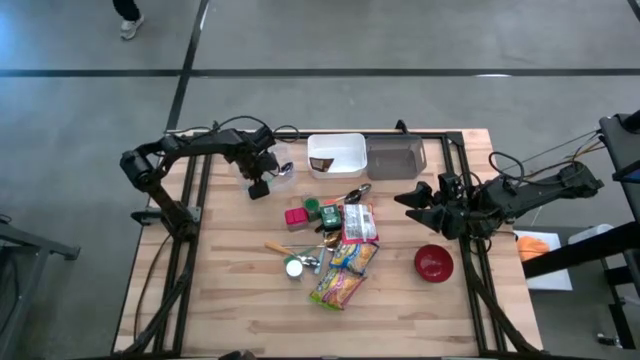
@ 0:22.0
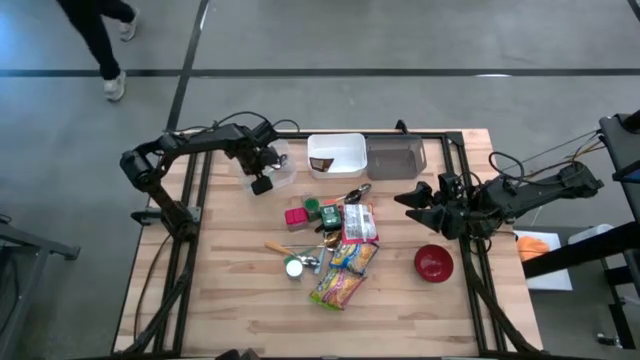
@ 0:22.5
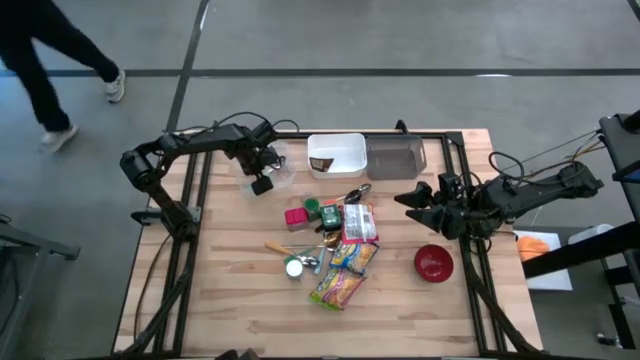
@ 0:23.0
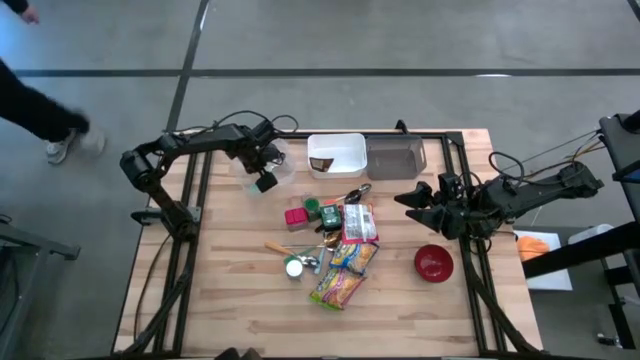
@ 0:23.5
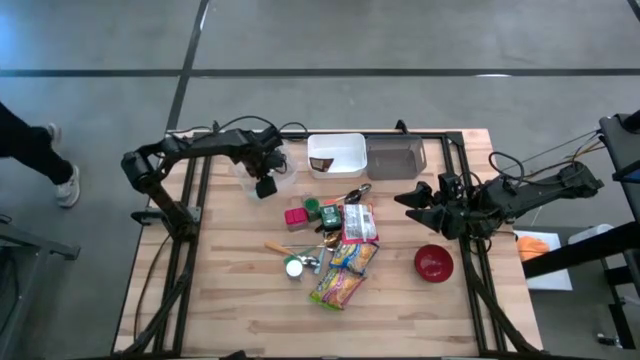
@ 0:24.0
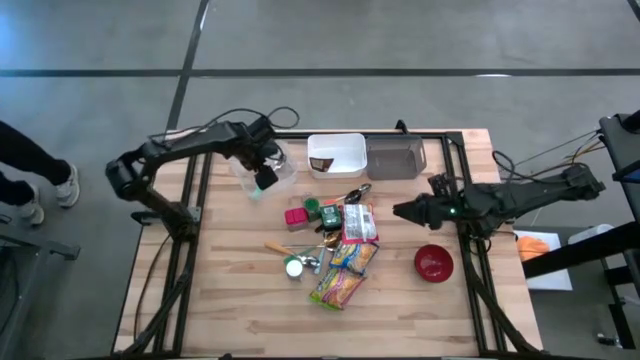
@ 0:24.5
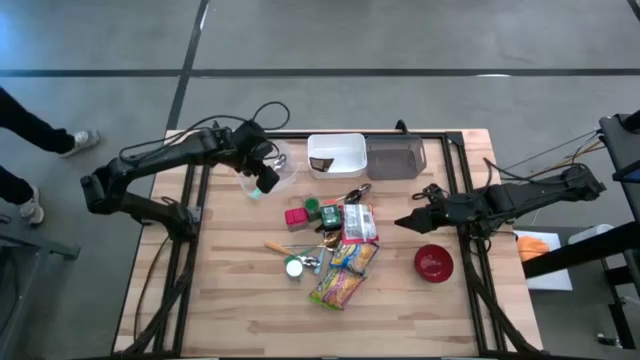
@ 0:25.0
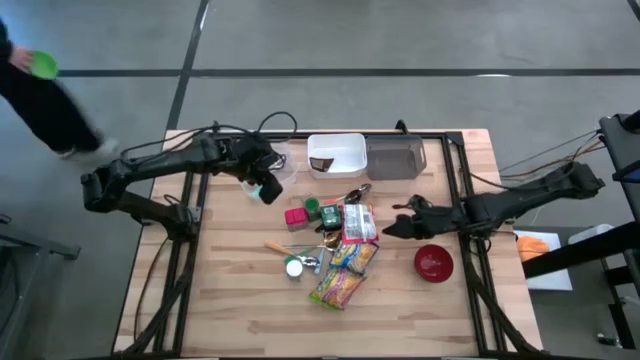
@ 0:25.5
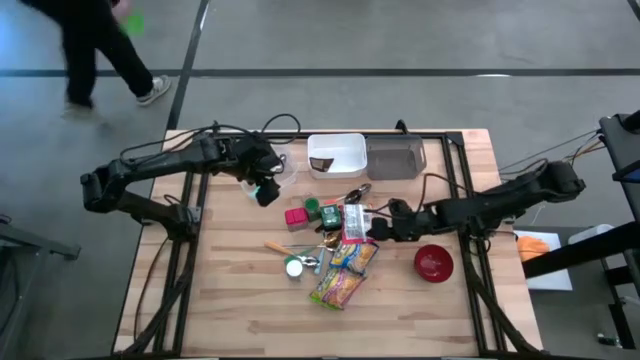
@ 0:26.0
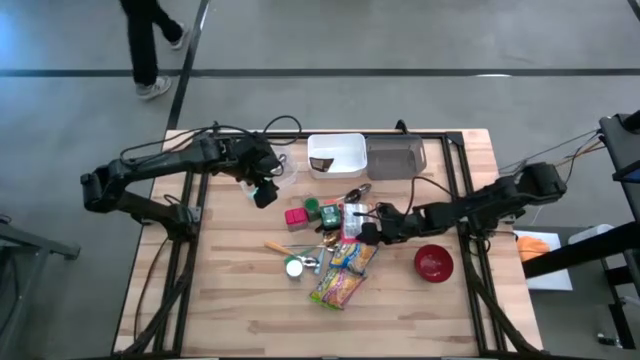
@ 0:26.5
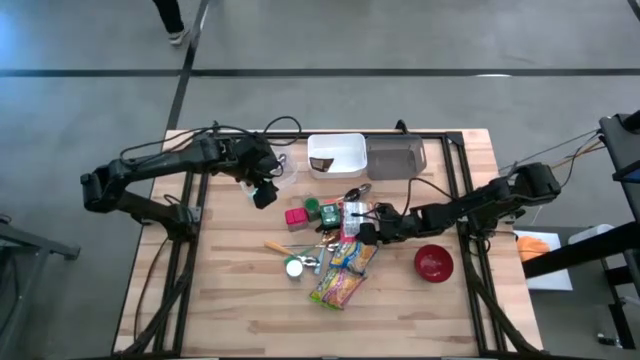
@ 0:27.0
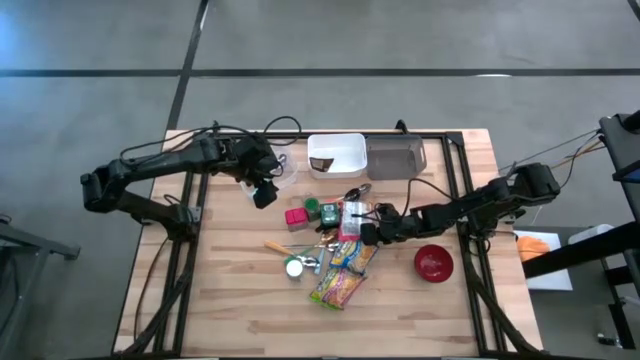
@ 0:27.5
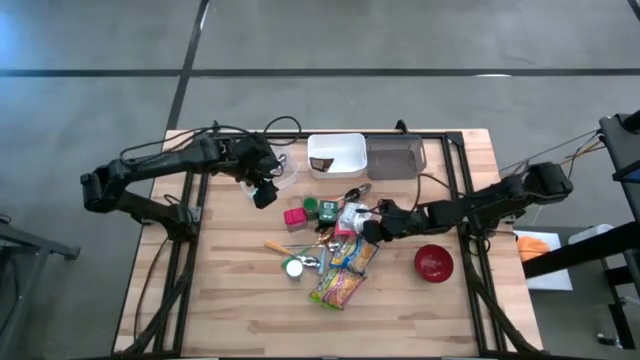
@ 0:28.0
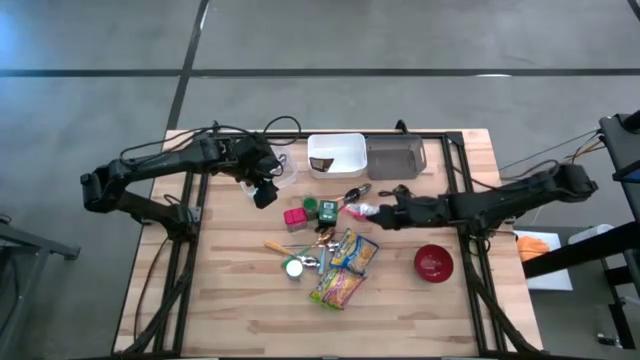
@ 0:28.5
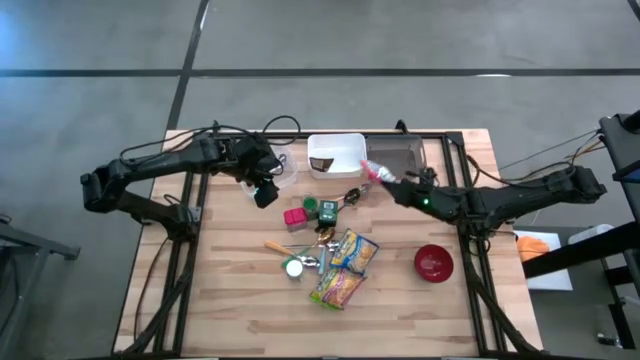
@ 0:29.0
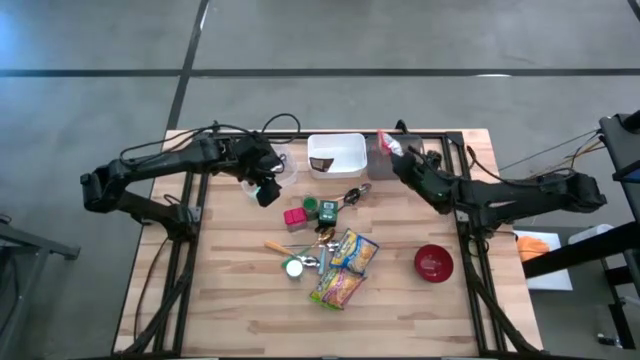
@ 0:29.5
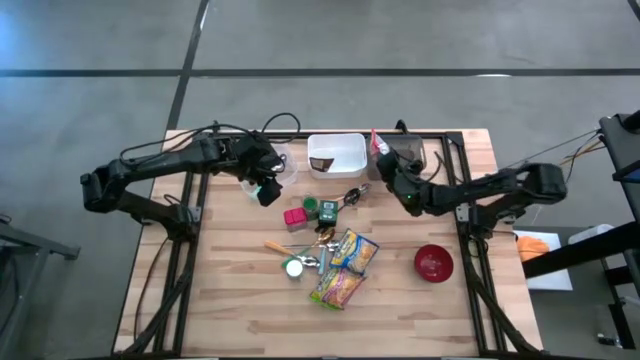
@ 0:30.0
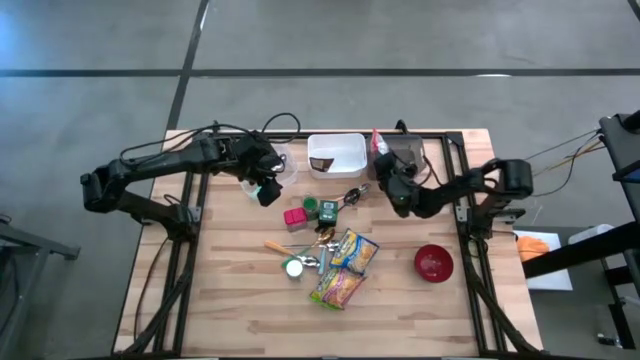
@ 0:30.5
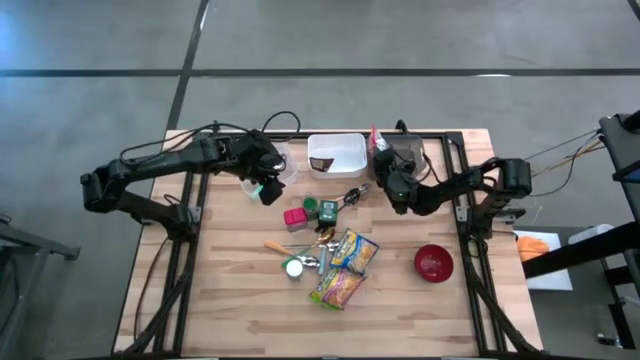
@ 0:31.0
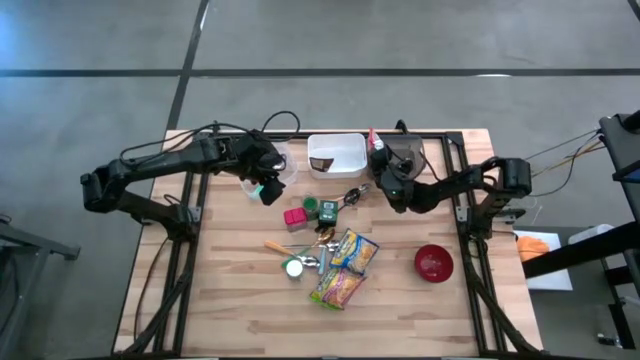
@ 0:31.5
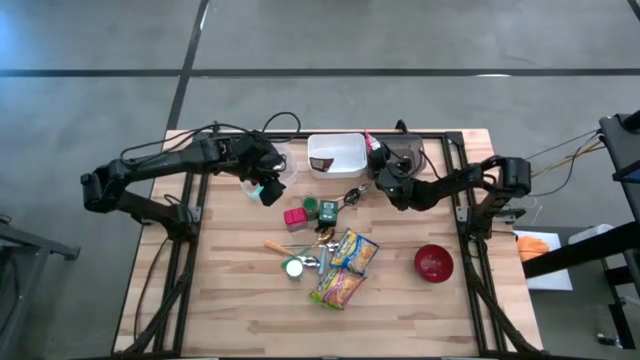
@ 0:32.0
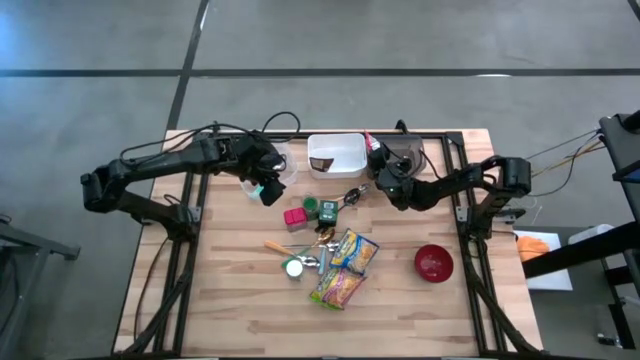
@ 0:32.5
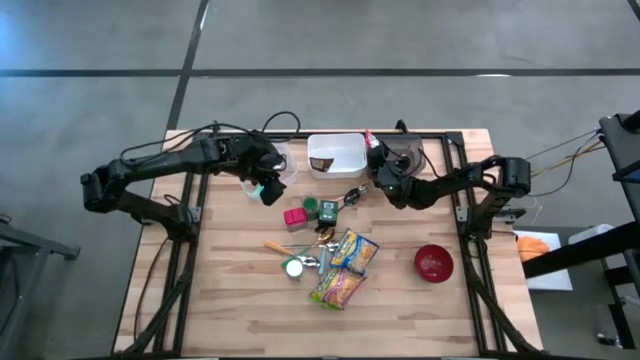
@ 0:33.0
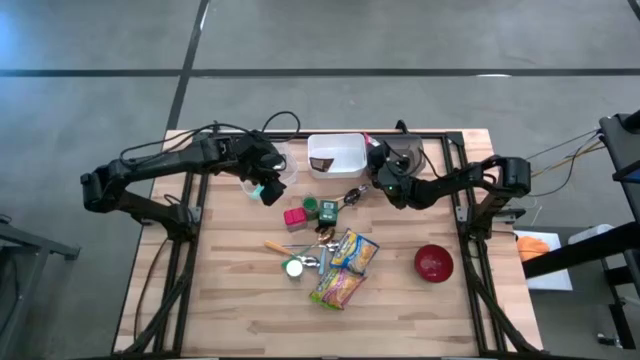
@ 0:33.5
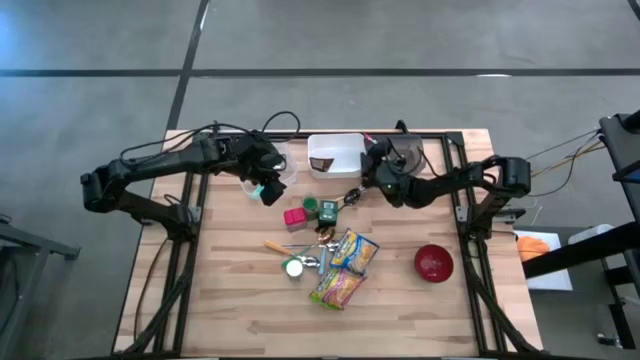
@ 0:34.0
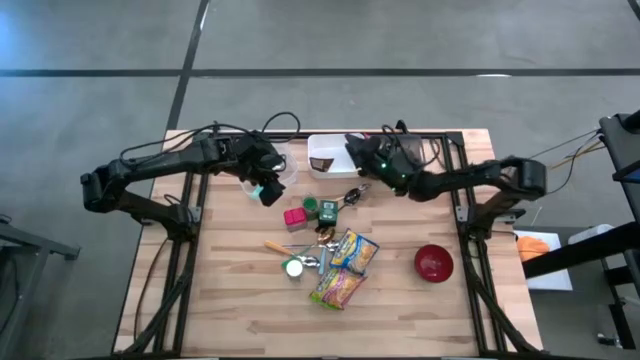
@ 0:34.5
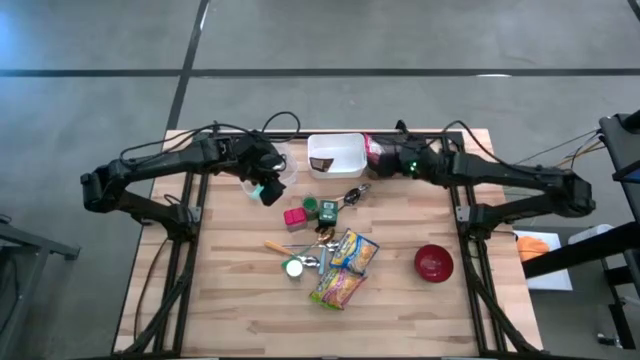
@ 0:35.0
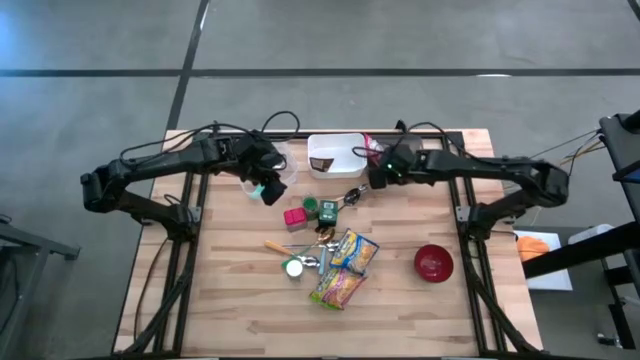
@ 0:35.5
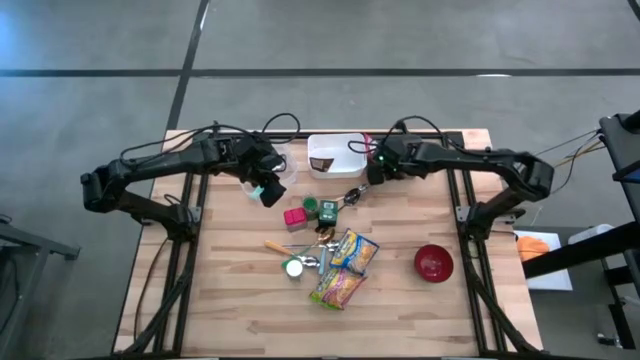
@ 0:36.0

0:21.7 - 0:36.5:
Put the red noodle pack into the black bin
